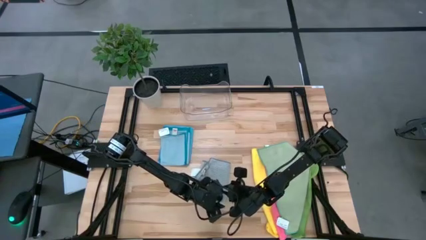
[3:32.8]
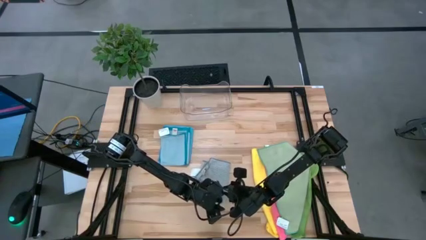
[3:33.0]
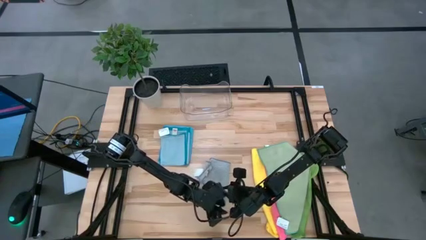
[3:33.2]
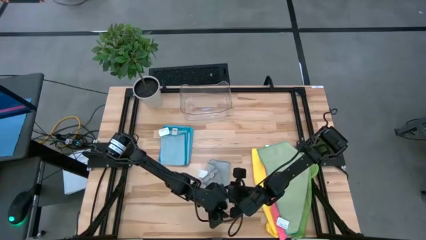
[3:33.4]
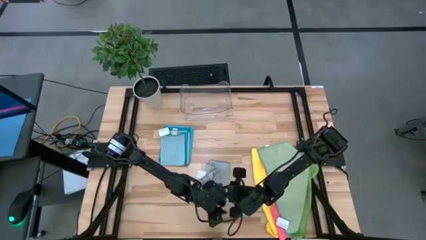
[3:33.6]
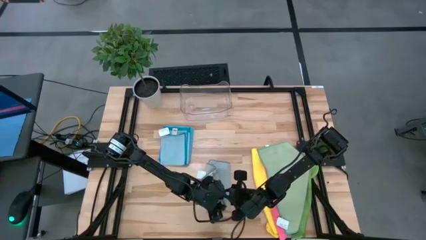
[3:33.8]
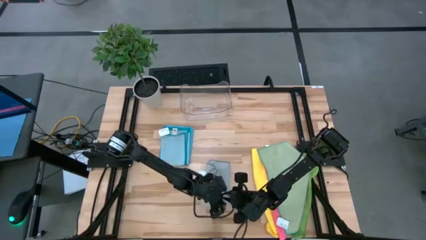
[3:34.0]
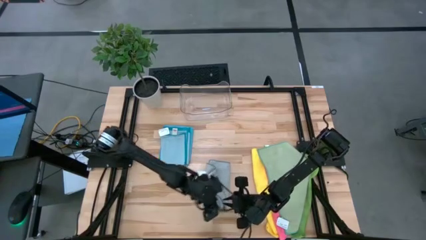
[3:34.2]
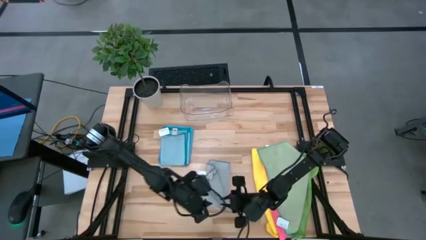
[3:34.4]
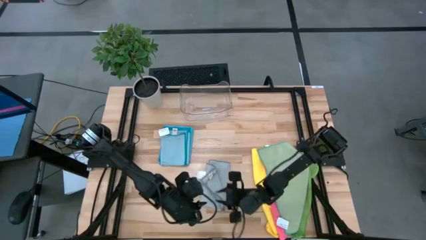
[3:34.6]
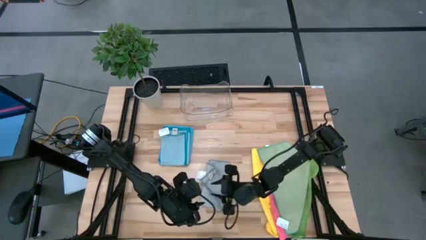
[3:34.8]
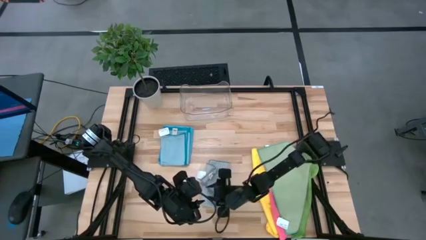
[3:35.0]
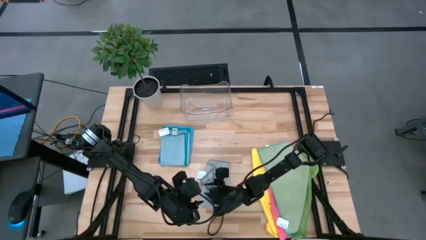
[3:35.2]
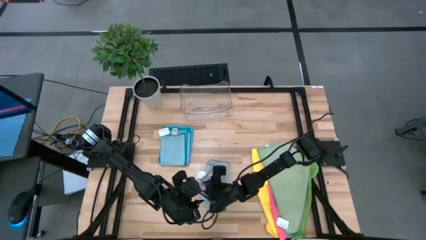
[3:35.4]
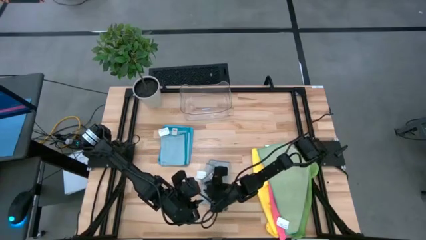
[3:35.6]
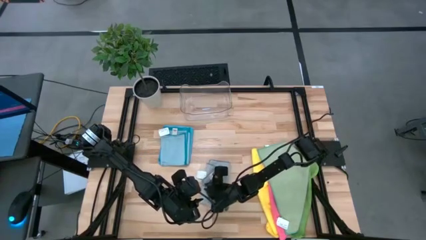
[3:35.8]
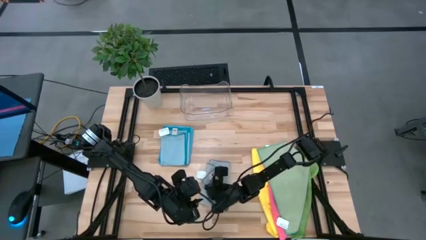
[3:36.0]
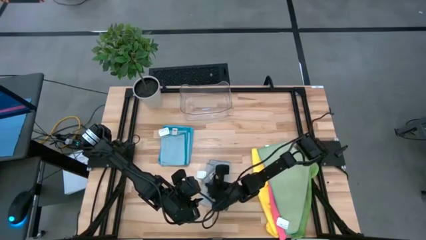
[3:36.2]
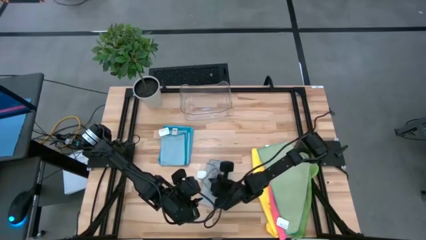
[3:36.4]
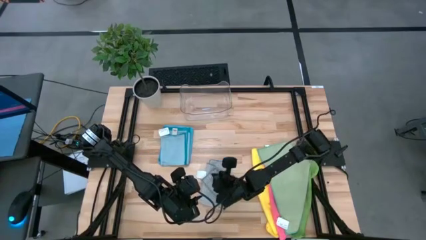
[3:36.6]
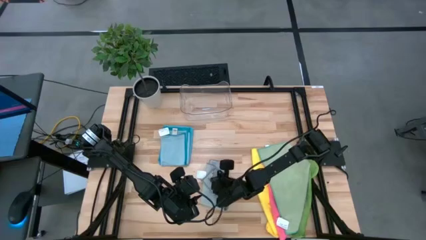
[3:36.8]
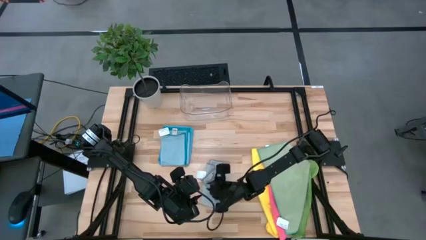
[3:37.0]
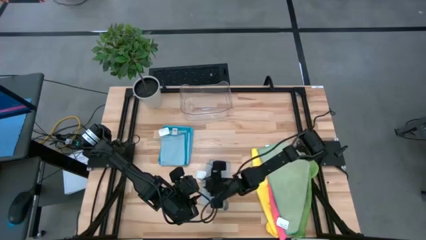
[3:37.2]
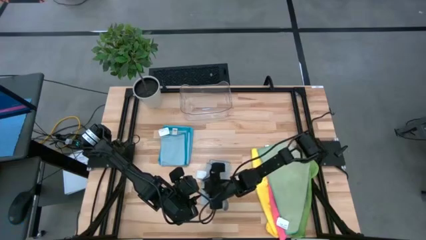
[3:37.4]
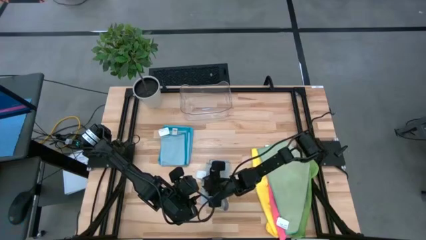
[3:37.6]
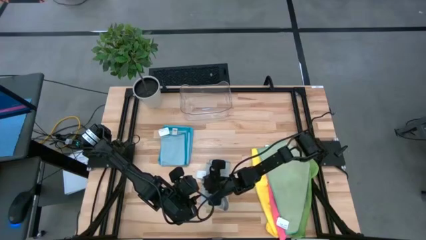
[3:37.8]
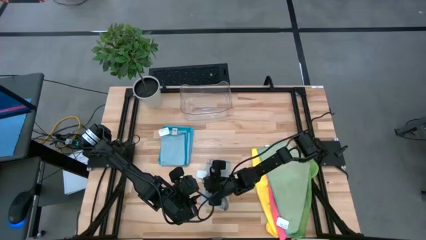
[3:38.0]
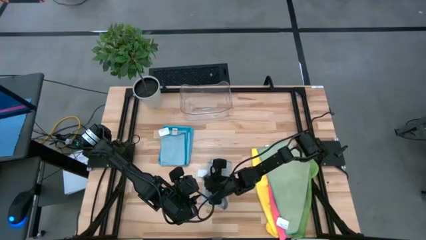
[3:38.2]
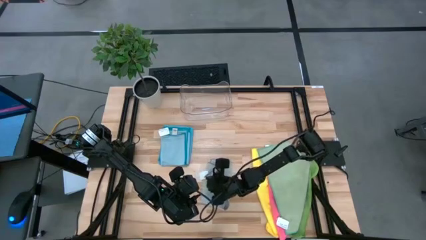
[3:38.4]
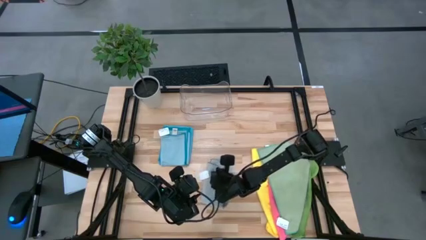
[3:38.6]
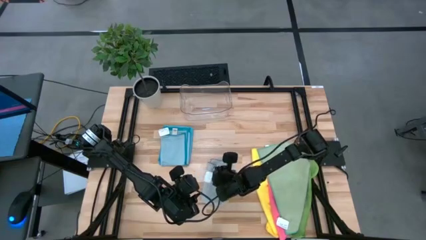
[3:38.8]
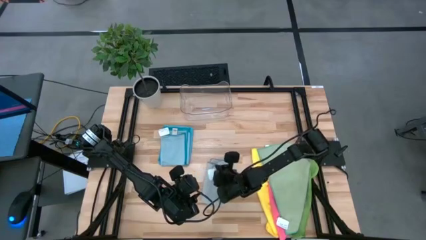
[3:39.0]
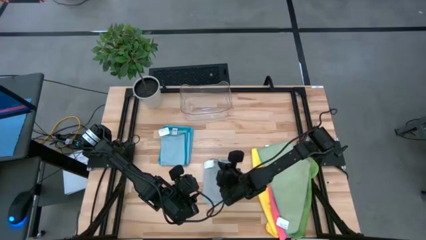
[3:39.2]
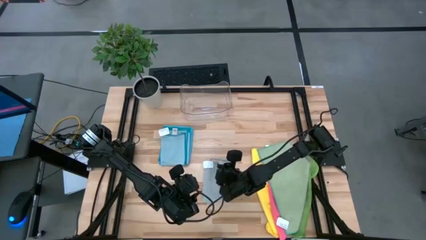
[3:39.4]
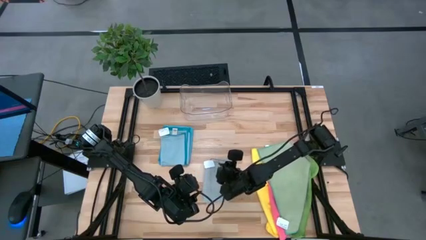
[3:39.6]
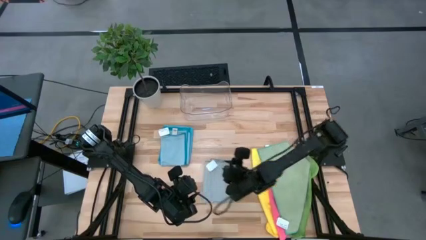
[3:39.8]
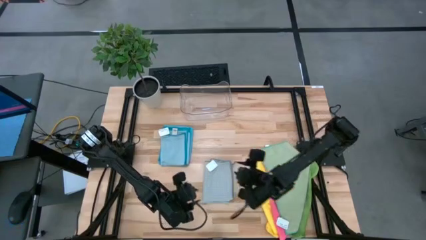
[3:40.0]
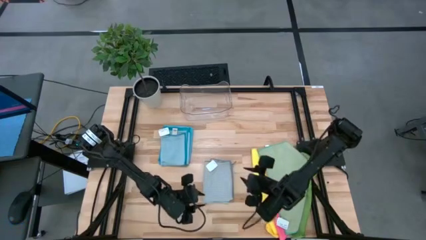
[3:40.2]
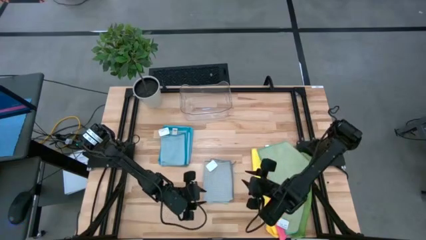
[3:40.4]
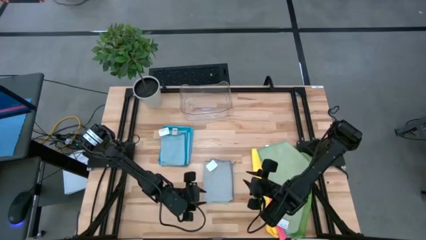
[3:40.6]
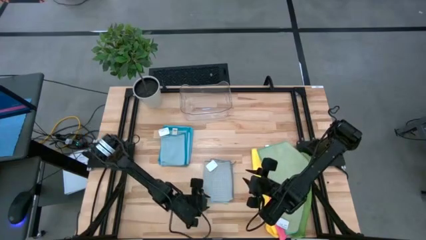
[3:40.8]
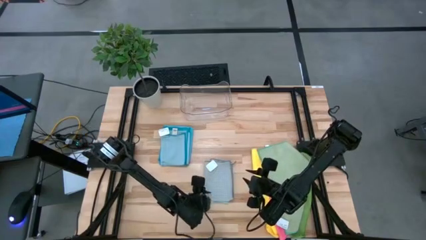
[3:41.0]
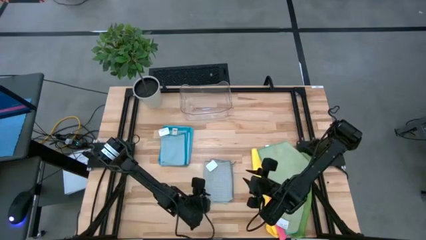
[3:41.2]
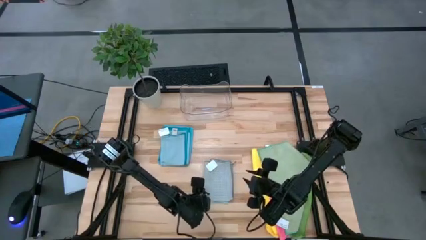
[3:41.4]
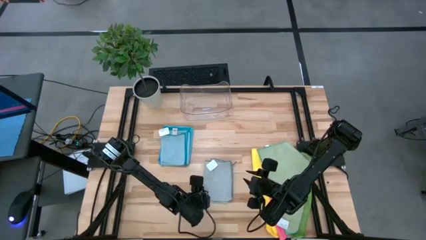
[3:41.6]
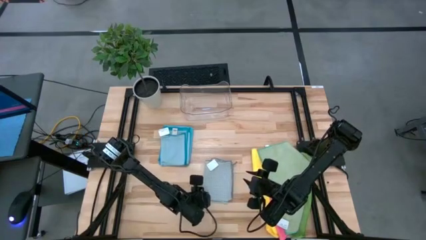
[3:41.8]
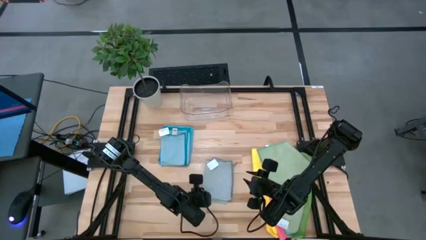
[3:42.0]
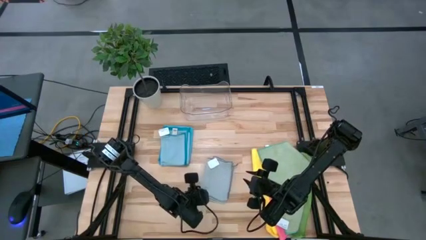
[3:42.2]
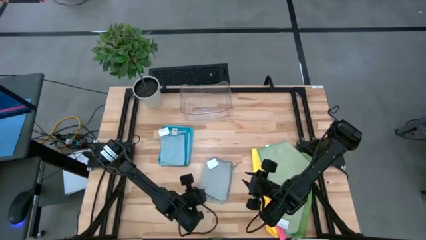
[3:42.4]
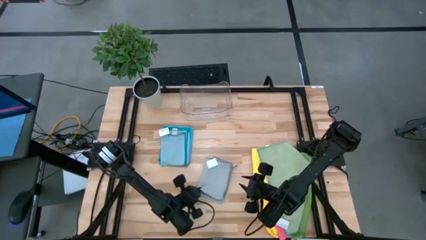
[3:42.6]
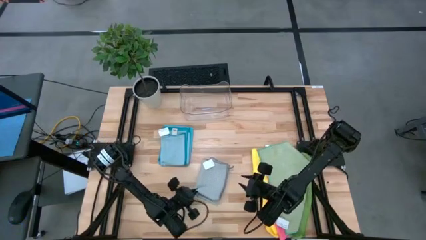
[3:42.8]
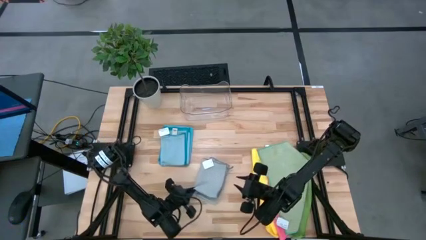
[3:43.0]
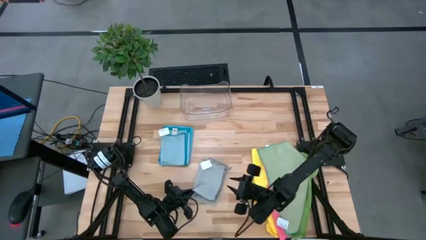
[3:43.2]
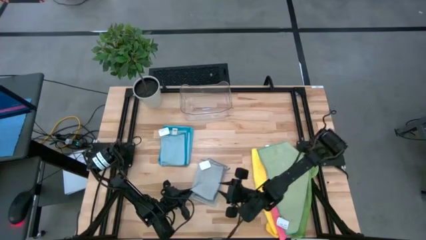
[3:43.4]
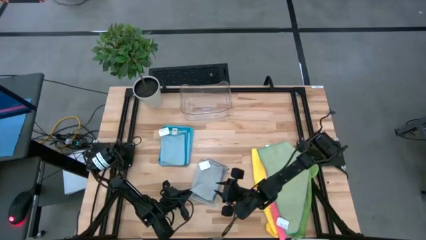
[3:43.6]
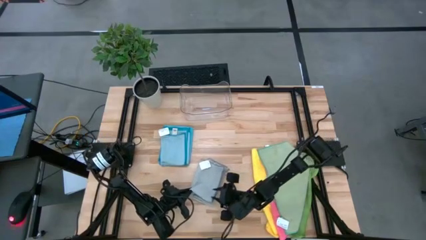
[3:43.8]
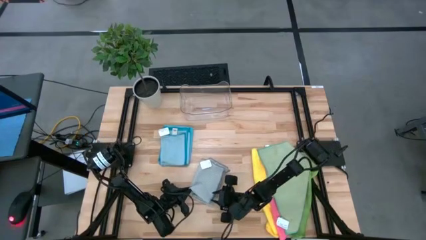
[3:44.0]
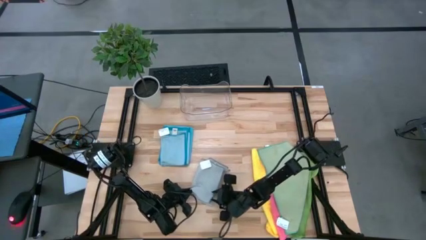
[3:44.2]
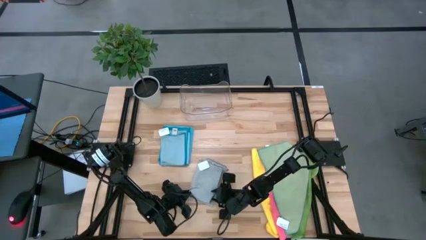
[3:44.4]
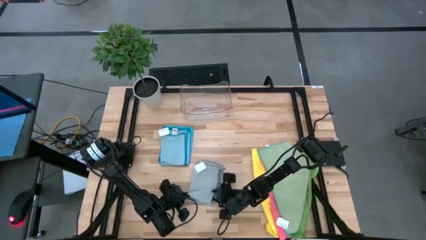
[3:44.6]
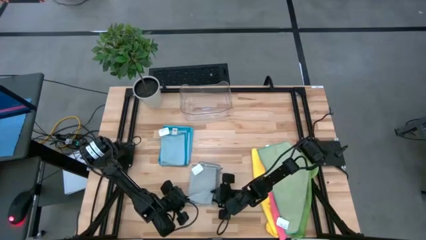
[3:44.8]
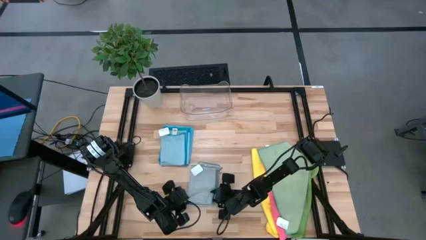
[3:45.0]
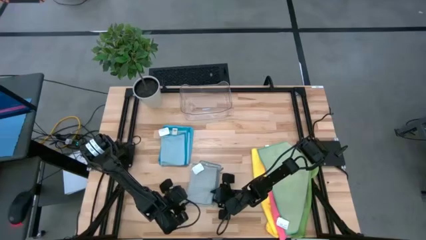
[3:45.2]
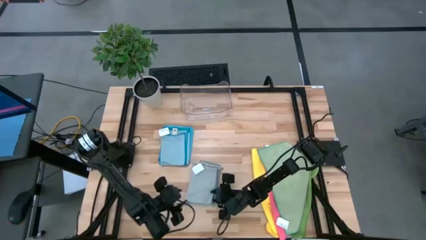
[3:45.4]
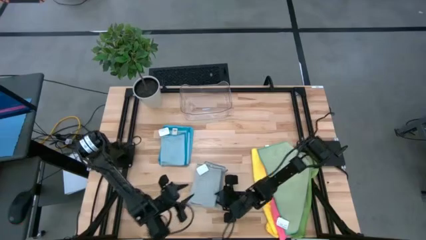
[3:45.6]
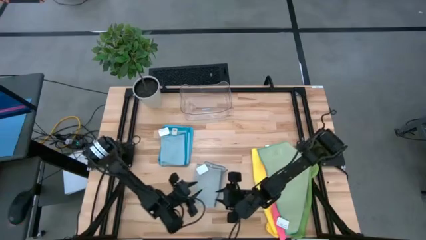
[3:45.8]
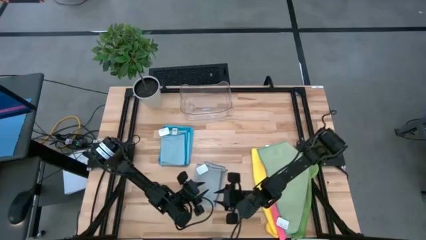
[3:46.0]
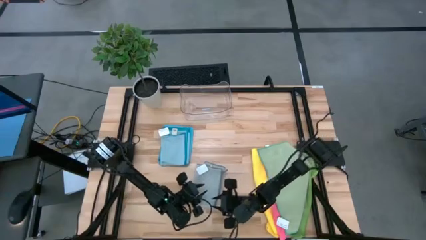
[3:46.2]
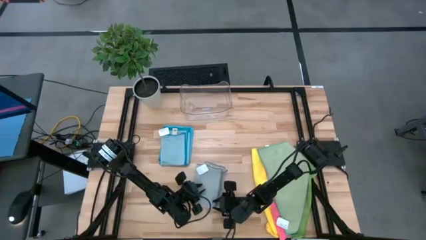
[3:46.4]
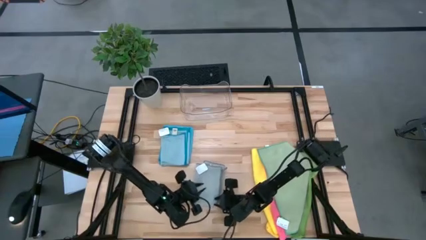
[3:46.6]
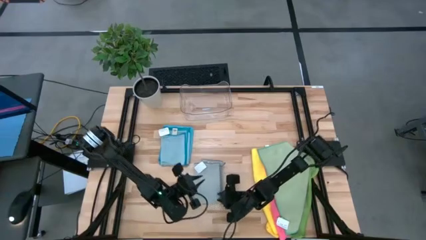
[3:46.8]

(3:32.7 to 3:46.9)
Task: Fold microfiber towels
Fold the gray microfiber cloth
